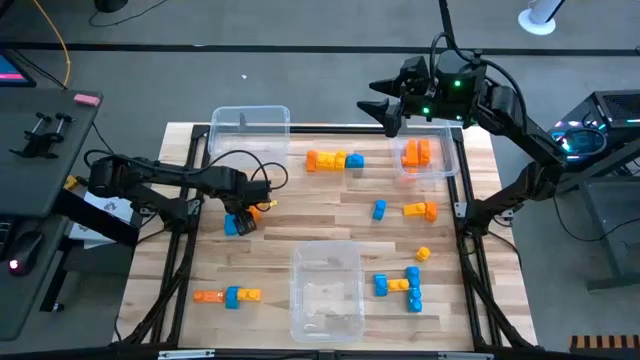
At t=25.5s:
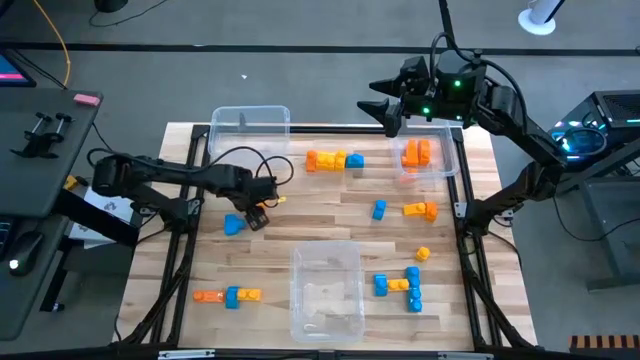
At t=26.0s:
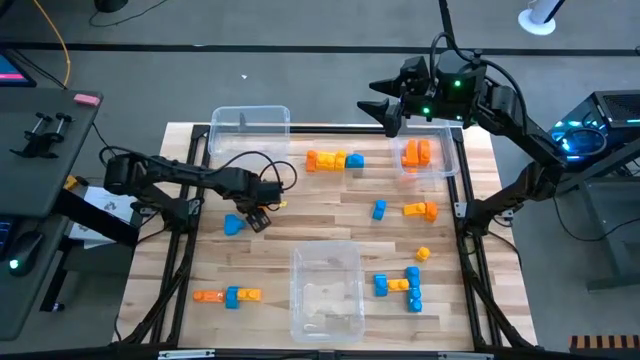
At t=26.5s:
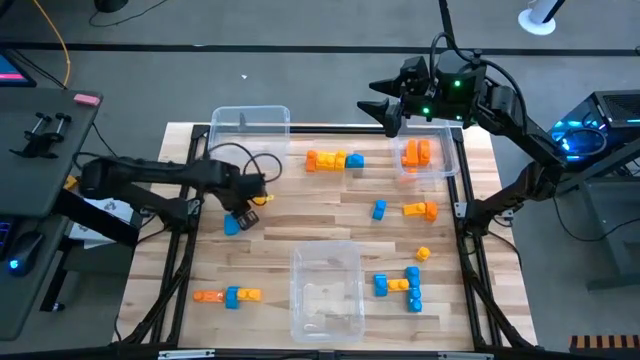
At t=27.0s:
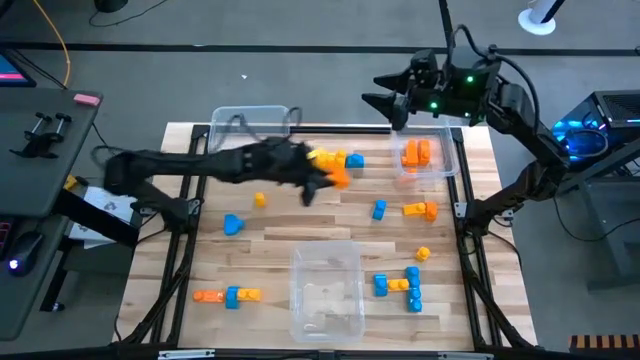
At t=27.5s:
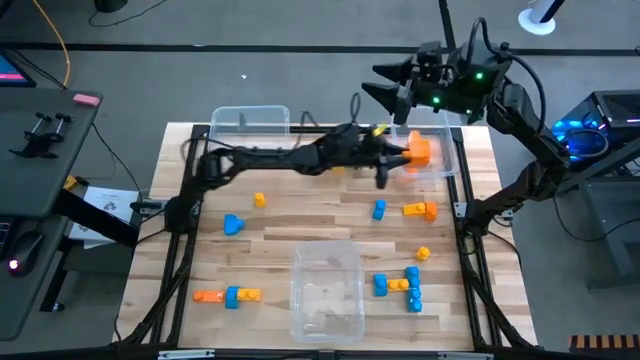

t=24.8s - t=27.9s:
Task: Sort blocks
Put the orange game piece into the top right transparent bin

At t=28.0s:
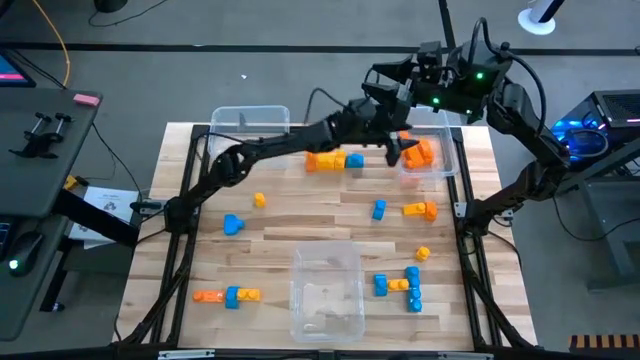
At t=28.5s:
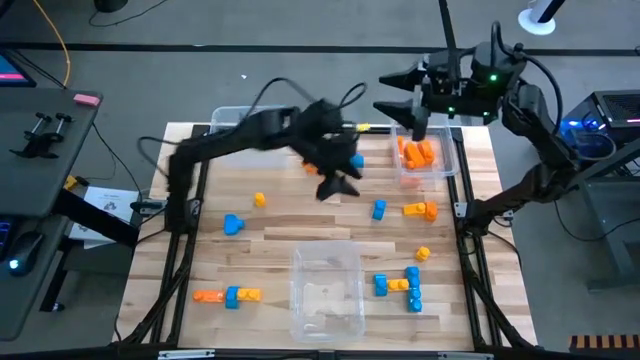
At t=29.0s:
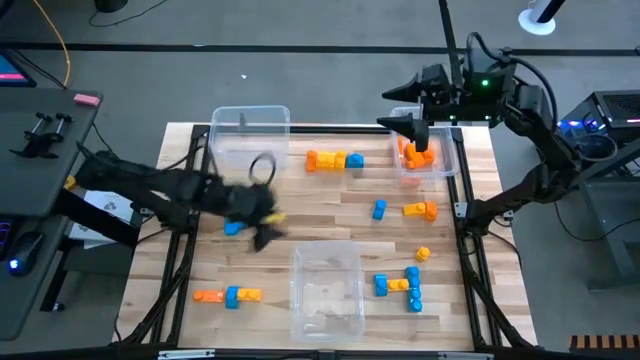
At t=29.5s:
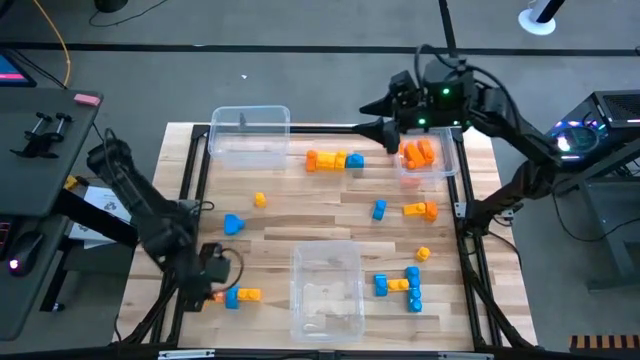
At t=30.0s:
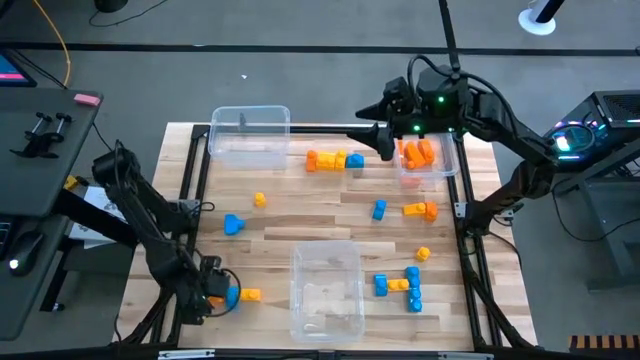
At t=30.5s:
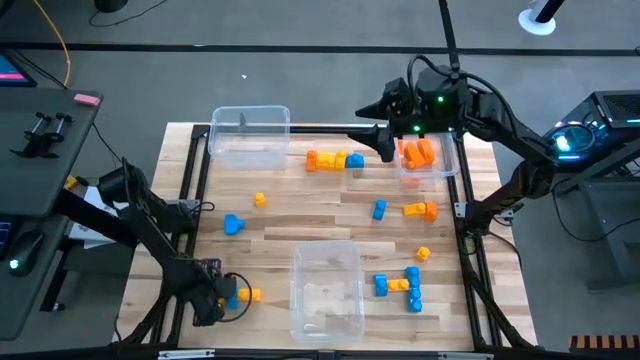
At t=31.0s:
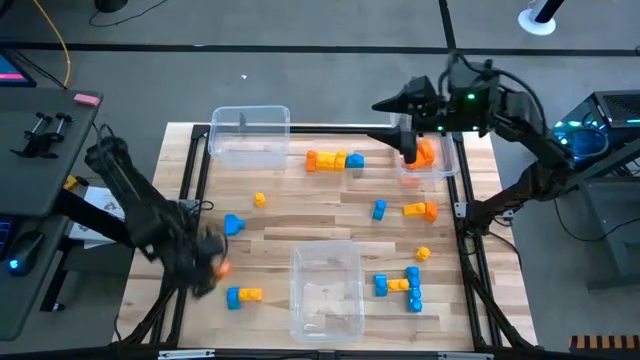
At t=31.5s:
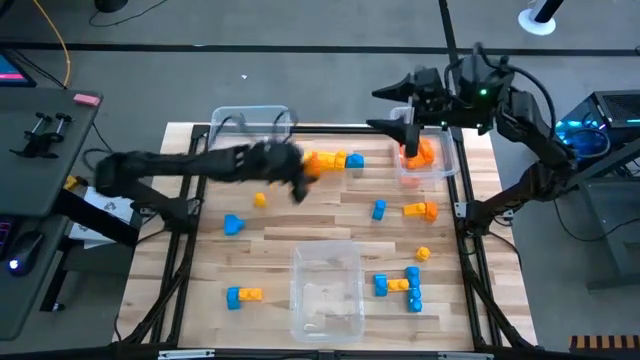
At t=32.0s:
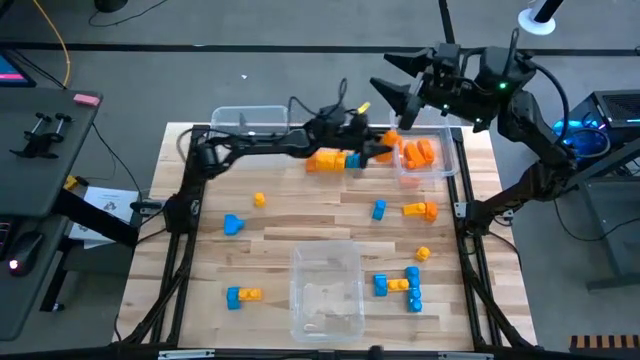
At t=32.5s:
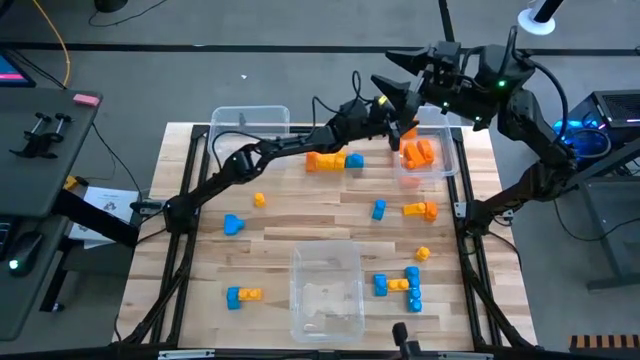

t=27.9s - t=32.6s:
Put the orange game piece into the top right transparent bin

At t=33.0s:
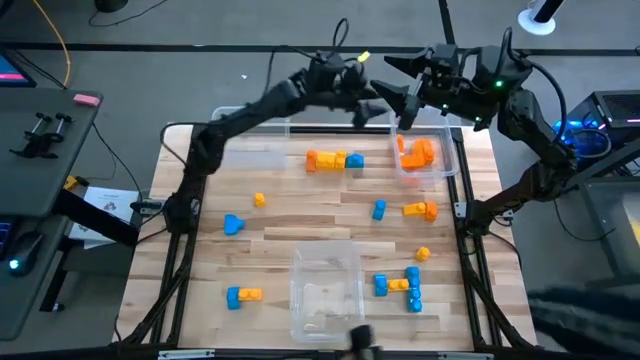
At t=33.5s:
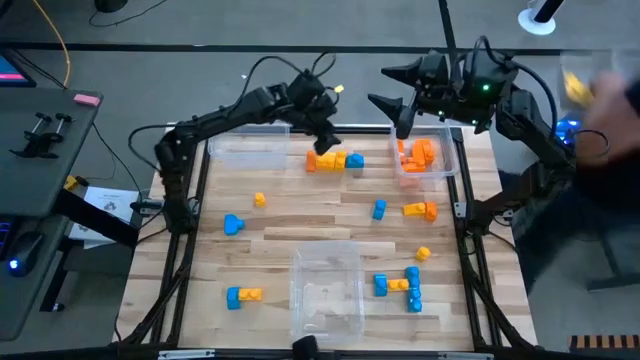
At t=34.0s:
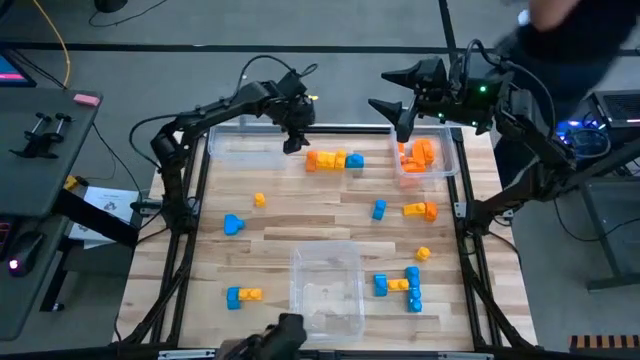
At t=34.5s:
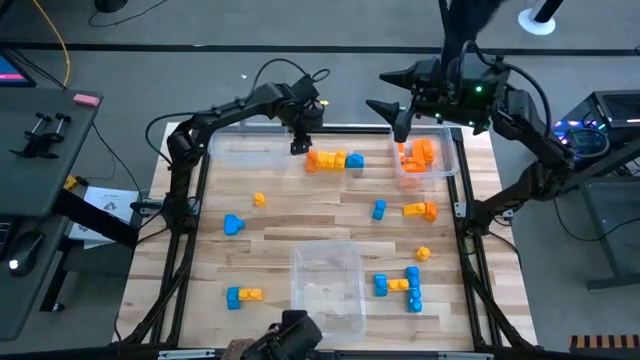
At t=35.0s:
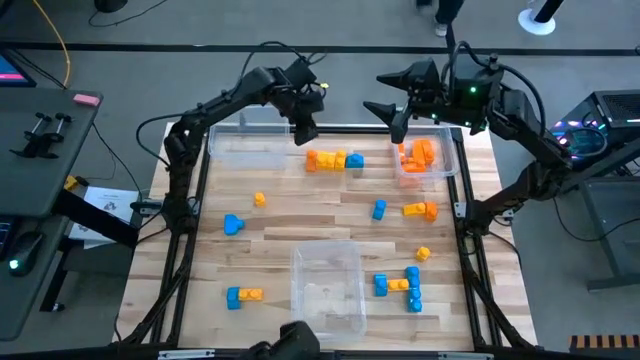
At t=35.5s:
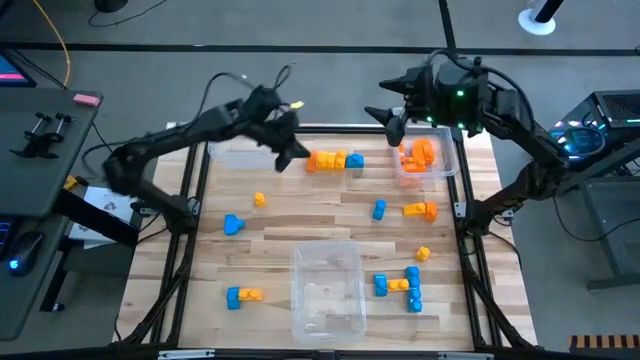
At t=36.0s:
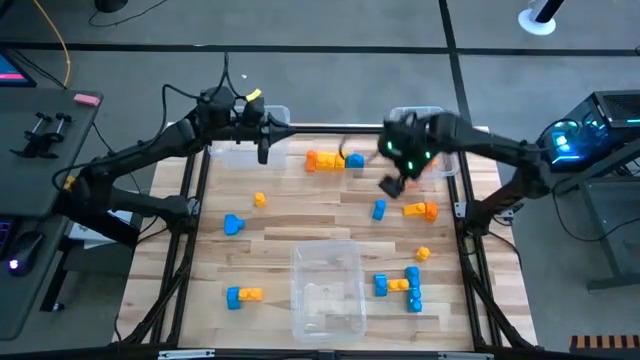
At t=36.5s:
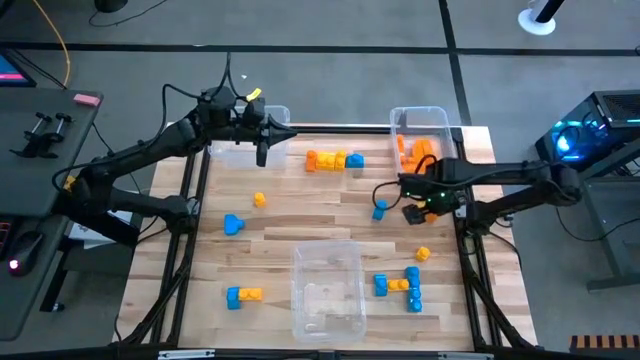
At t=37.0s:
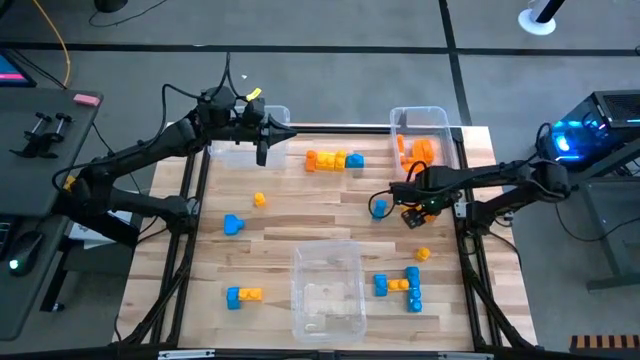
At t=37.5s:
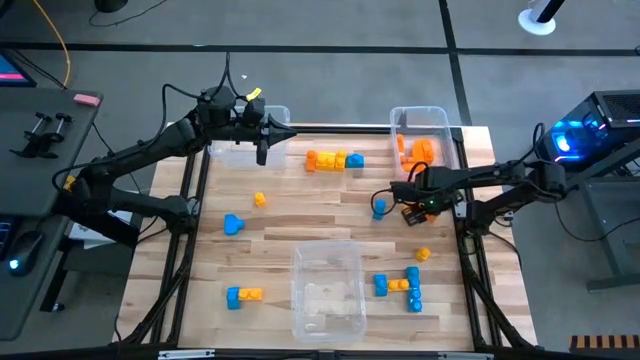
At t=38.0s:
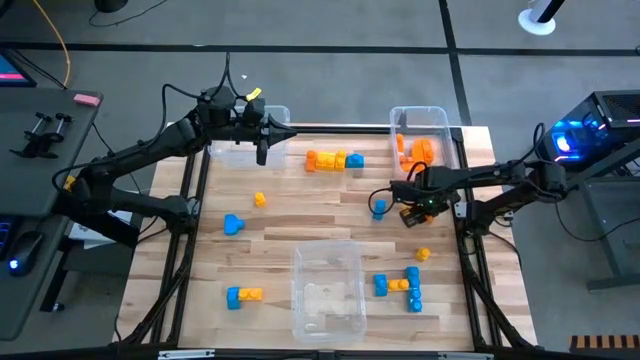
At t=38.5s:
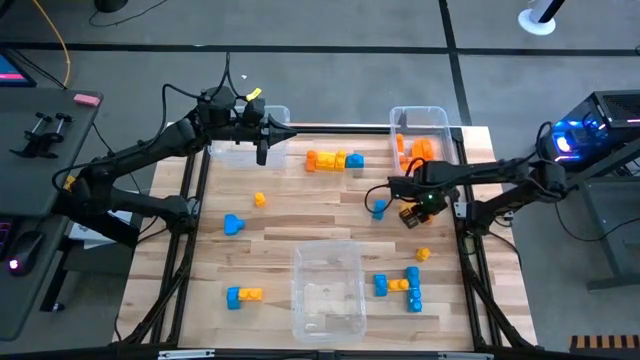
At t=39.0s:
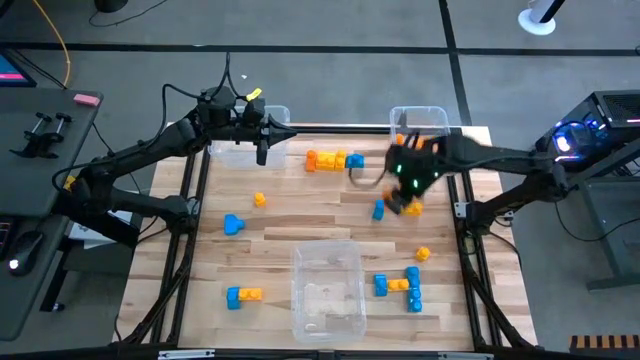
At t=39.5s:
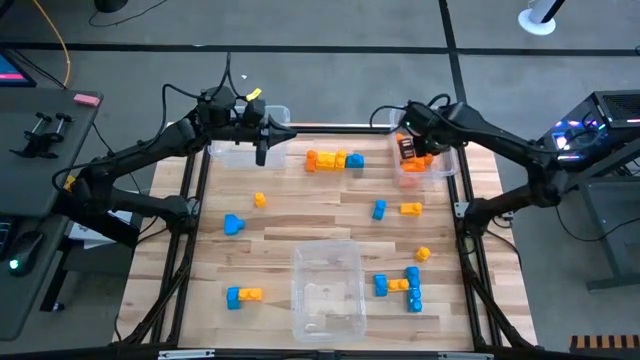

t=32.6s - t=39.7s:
Put the orange game piece into the top right transparent bin

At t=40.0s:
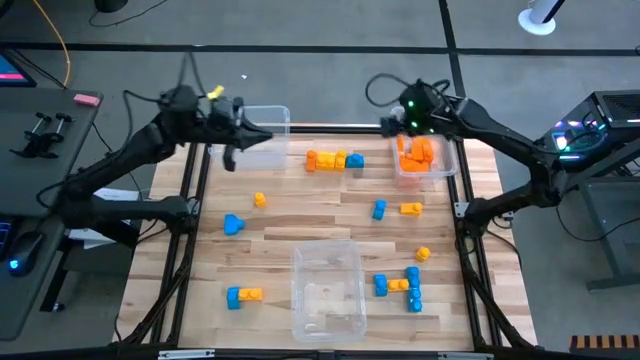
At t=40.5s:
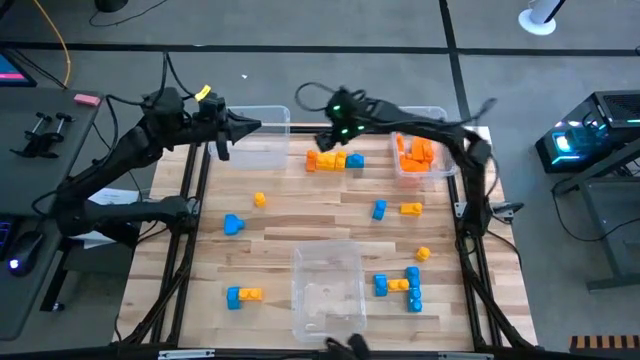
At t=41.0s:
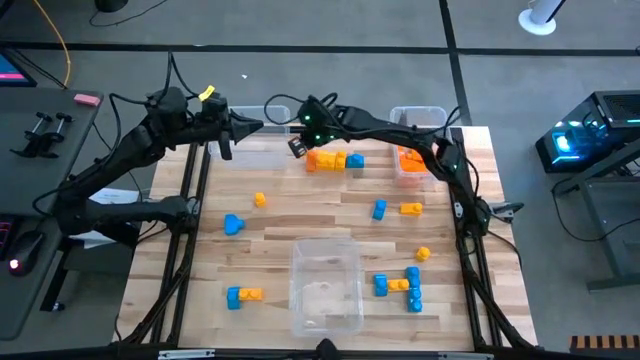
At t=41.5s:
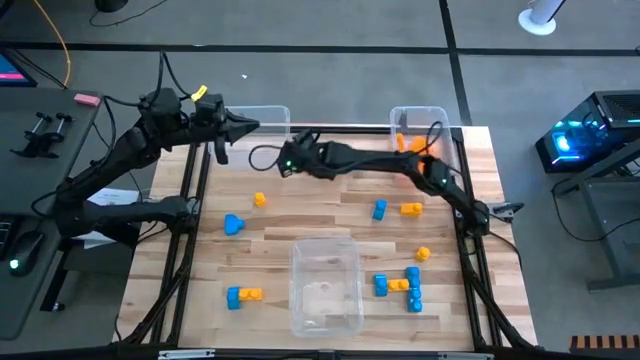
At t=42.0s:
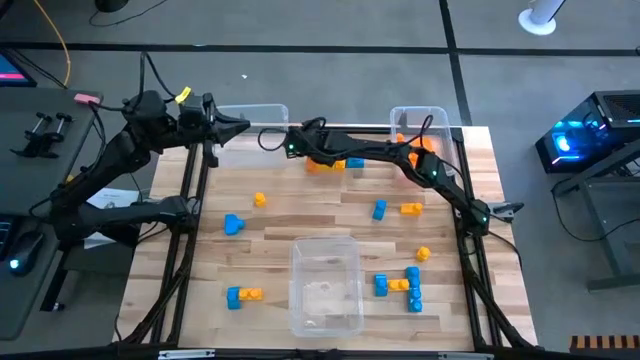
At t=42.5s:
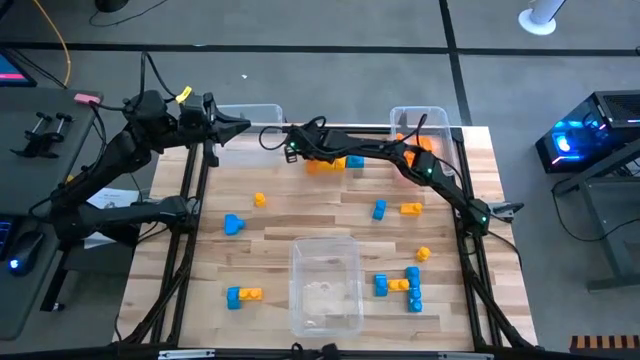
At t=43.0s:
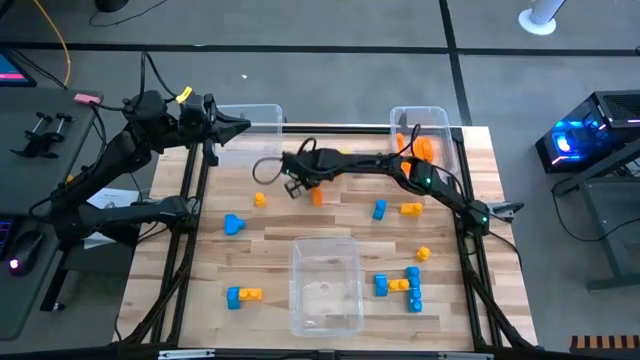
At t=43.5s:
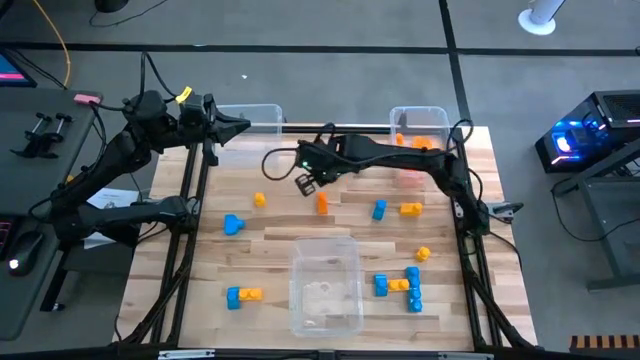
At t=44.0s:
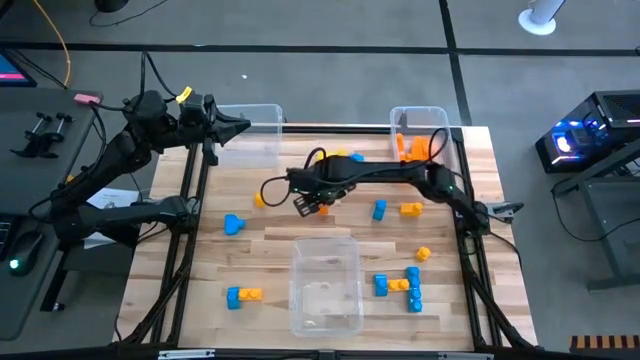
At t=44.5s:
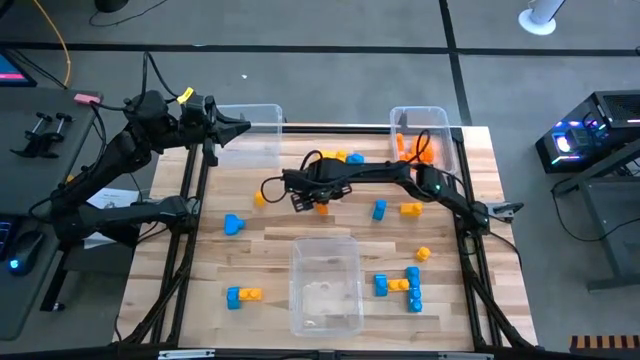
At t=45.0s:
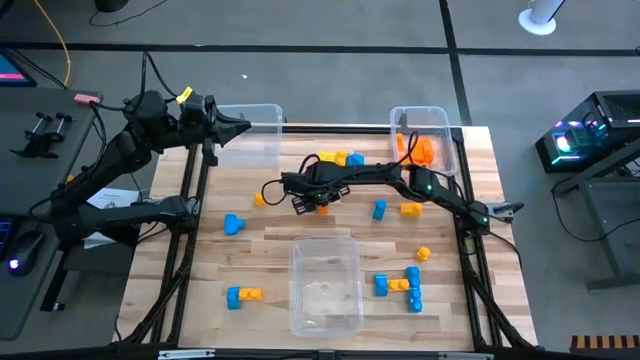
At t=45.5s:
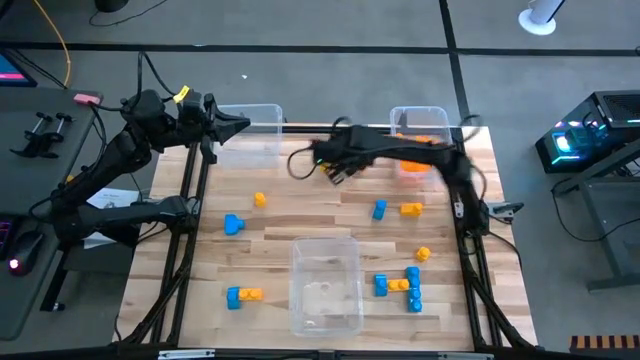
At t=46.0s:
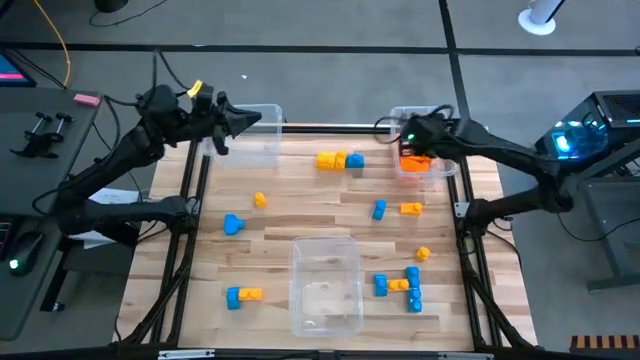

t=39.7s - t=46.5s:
Put the orange game piece into the top right transparent bin
